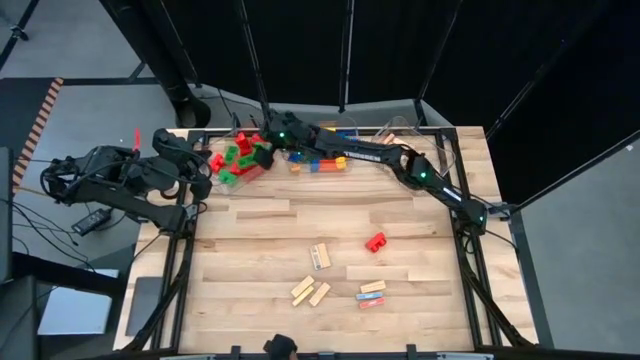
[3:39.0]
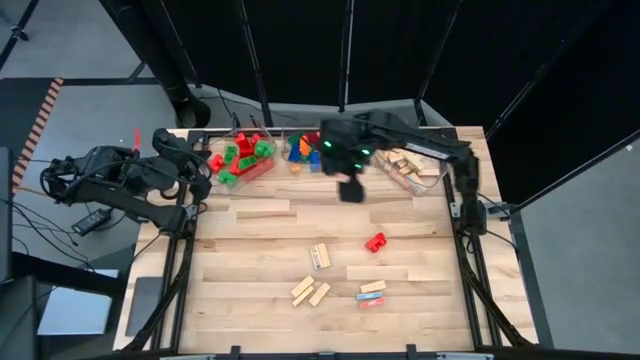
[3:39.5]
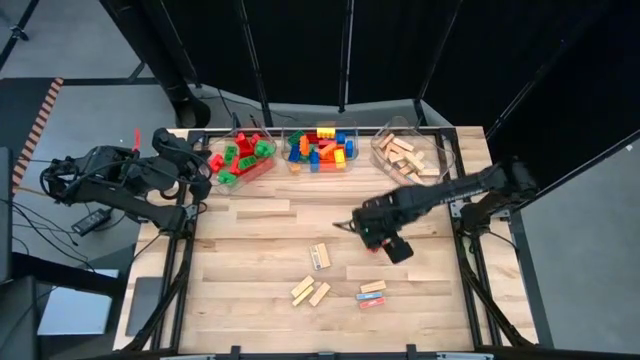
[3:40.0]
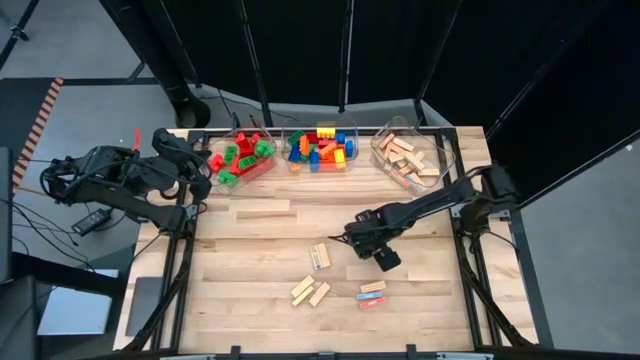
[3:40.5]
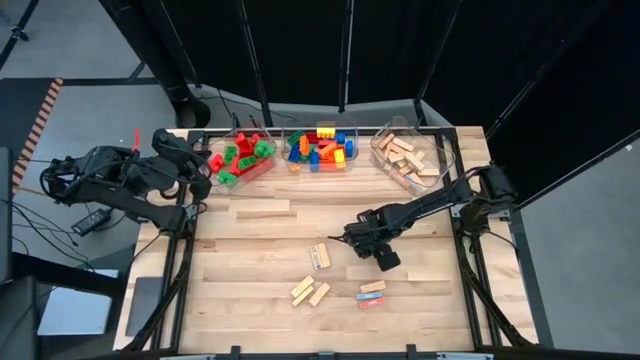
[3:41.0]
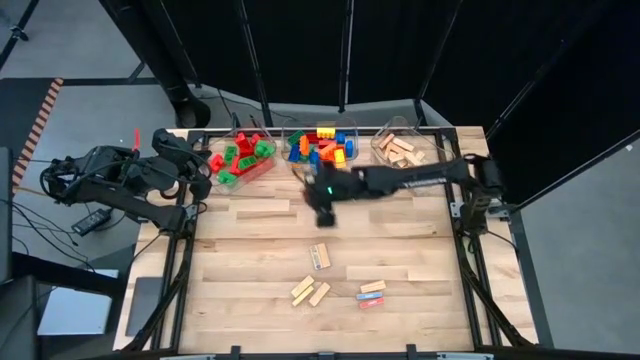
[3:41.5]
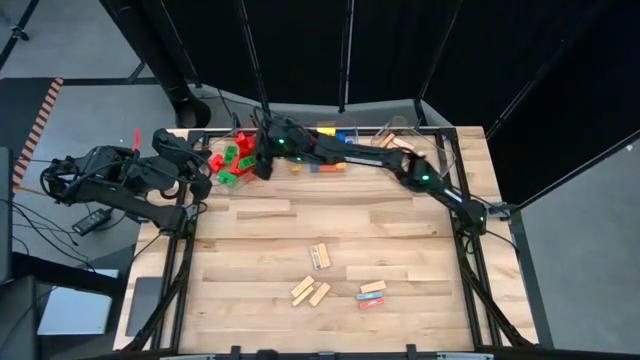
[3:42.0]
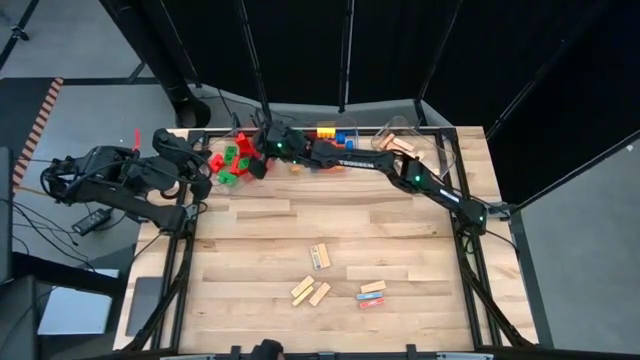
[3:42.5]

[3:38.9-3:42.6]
Task: Sort blocks by size
Put the small red game piece into the left transparent bin

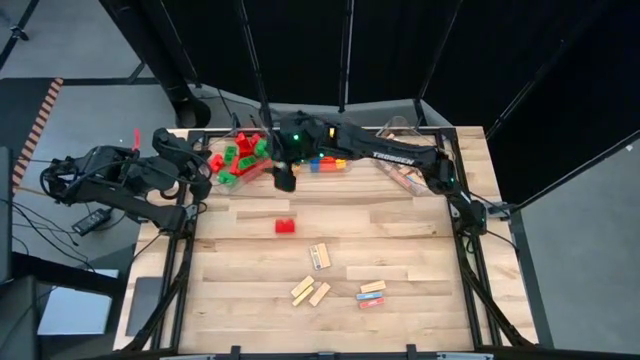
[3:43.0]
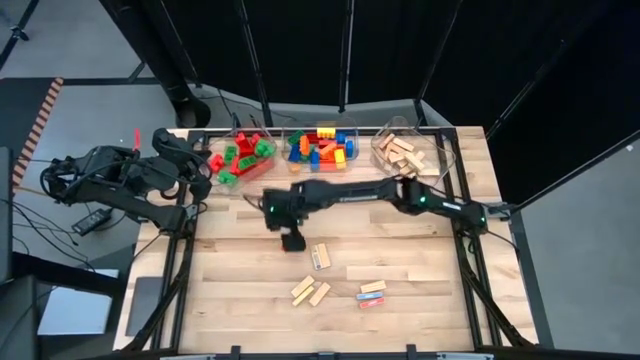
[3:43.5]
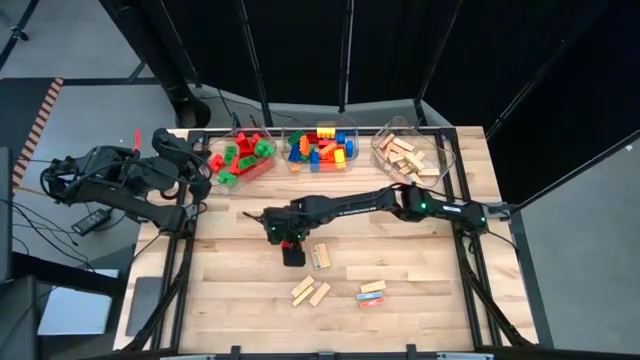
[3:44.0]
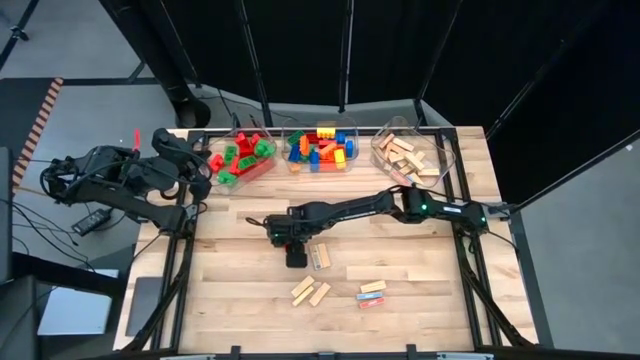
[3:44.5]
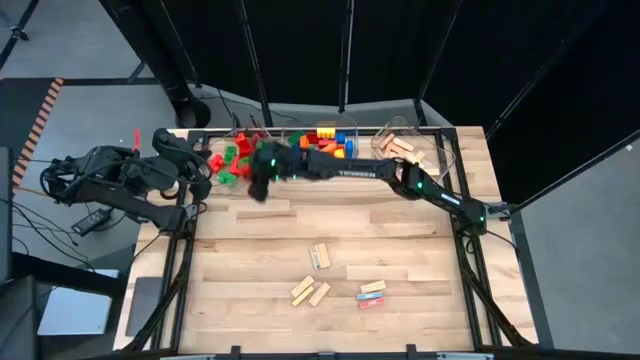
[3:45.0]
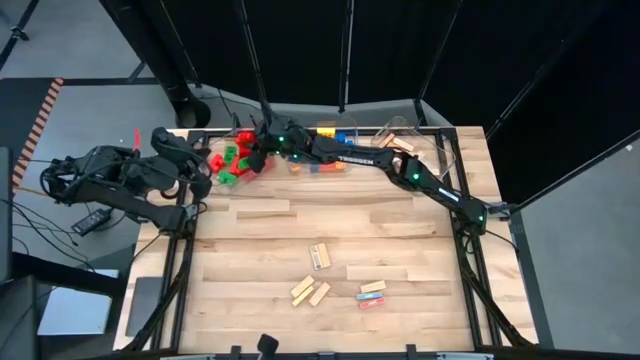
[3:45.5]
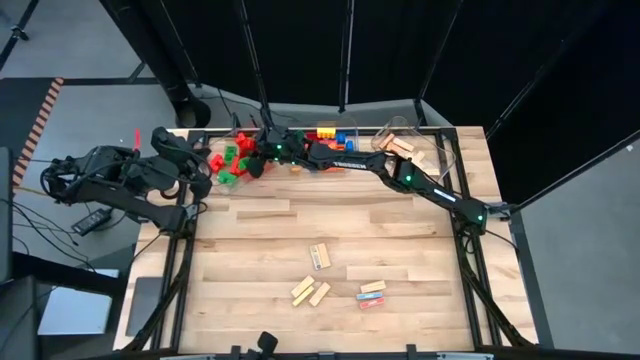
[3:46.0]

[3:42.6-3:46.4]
Put the small red game piece into the left transparent bin

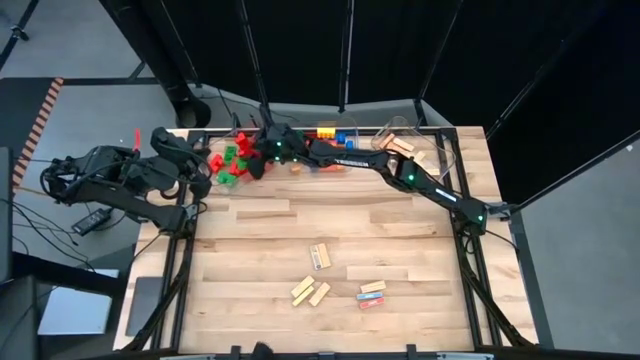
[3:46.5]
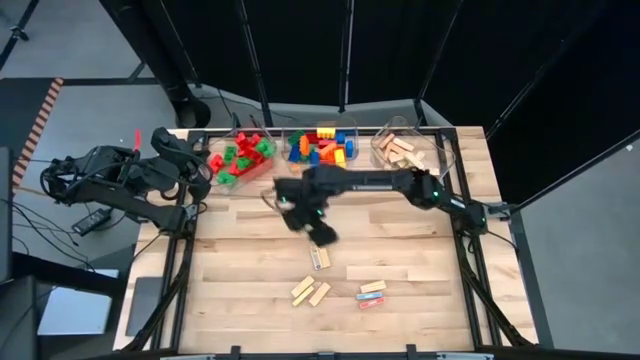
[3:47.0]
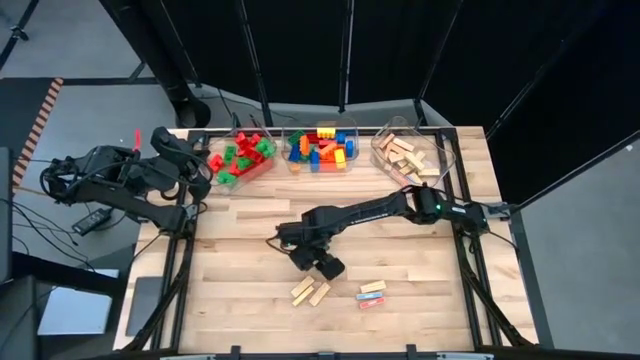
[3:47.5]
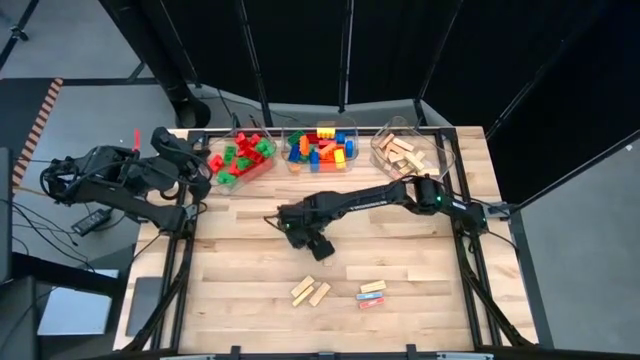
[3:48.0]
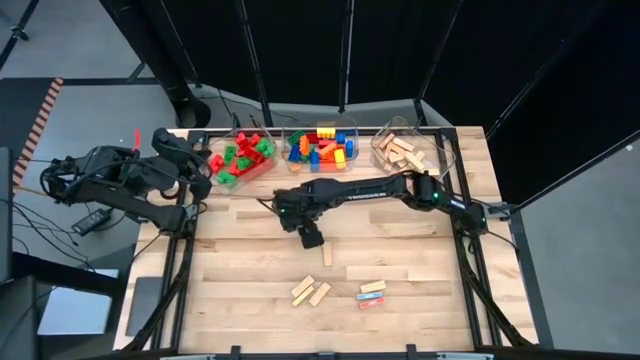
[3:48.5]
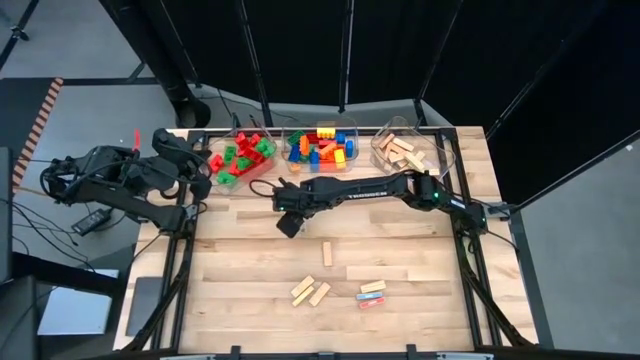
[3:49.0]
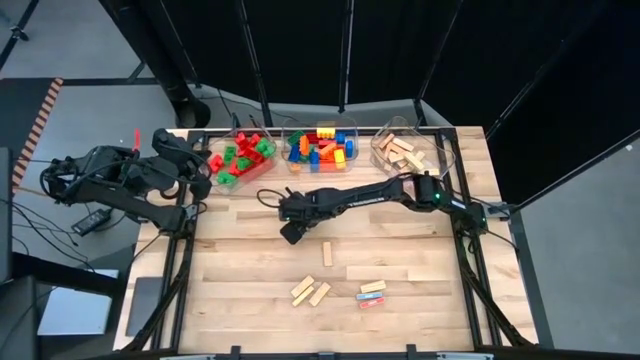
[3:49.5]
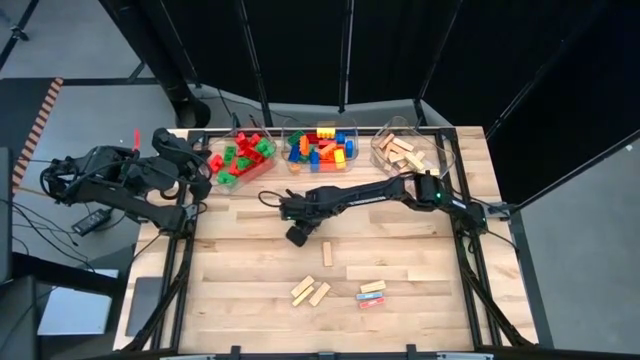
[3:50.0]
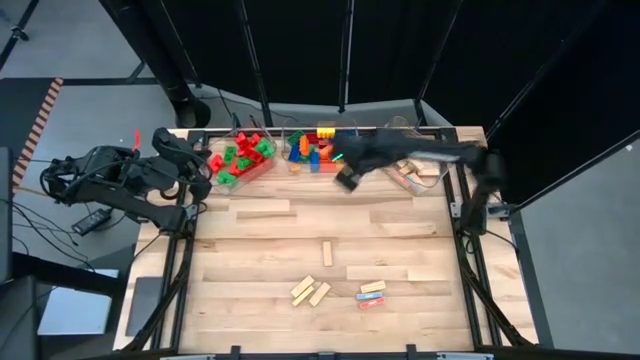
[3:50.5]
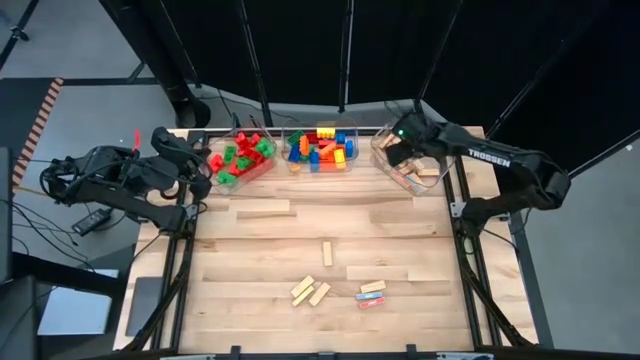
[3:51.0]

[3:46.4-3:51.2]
Put the brown wooden block into the right transparent bin

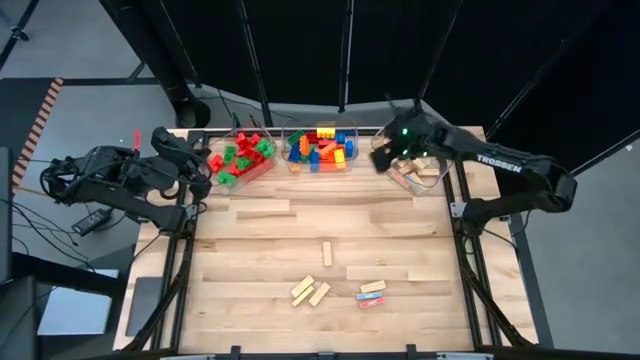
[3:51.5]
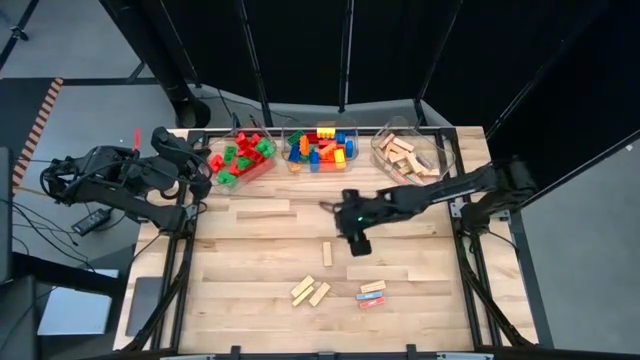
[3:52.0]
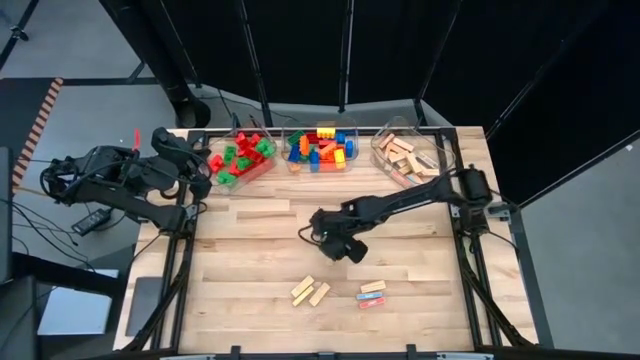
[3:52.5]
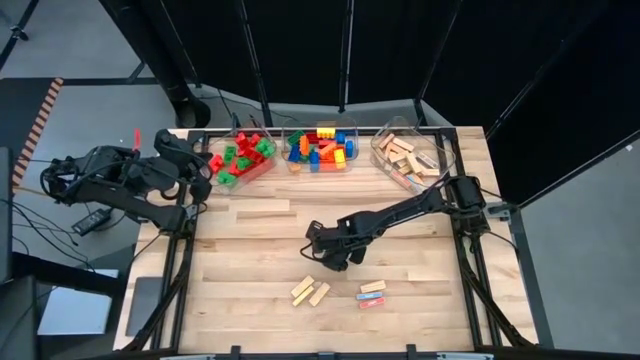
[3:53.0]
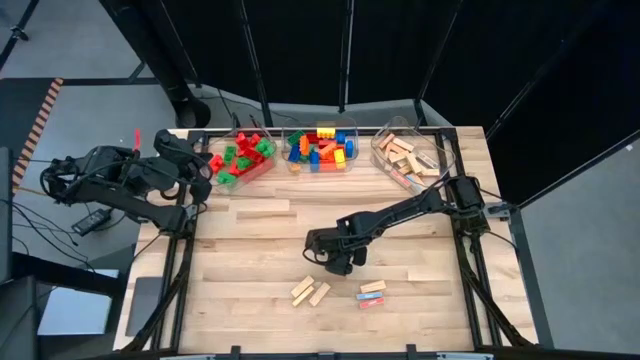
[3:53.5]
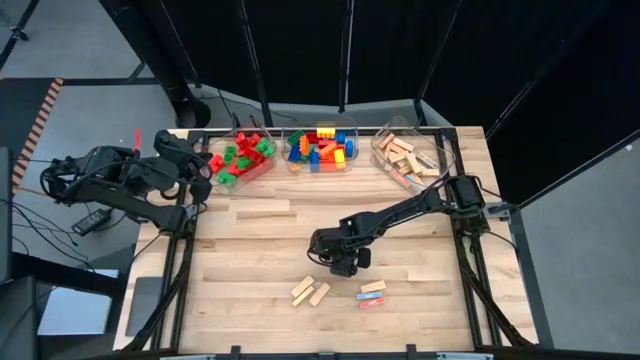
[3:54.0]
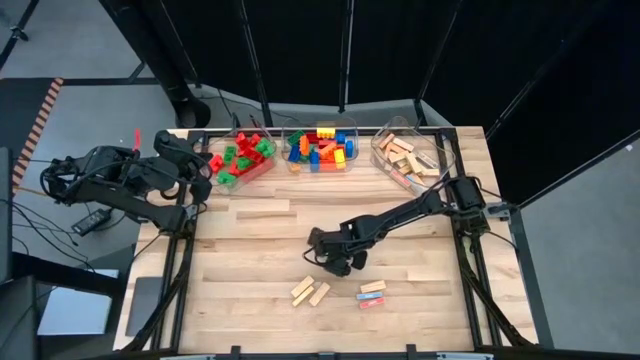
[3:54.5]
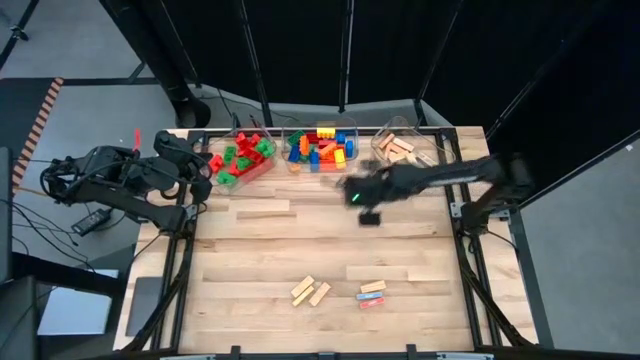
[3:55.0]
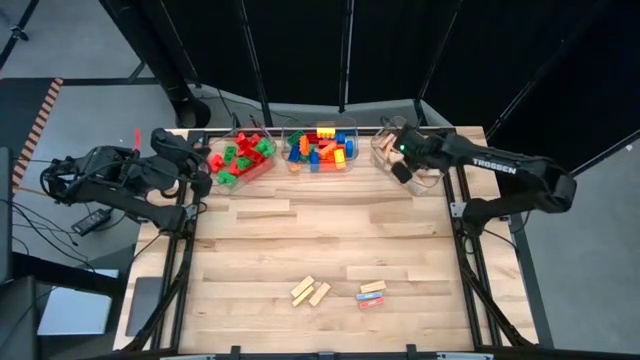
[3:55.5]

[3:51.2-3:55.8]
Put the brown wooden block into the right transparent bin

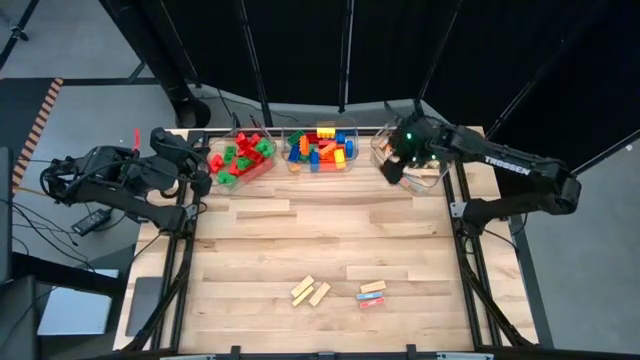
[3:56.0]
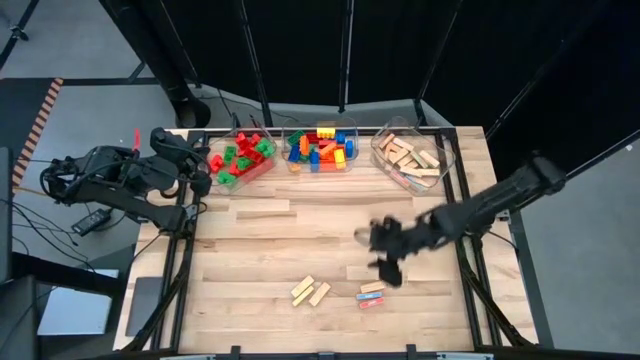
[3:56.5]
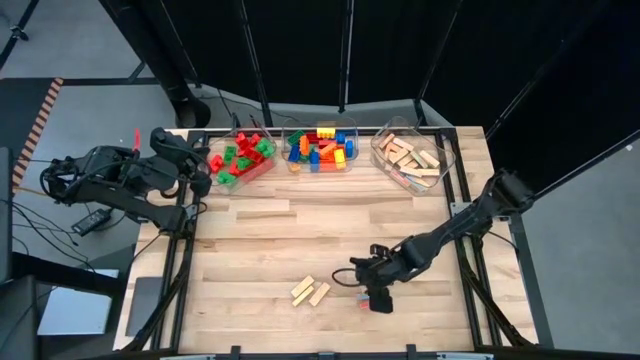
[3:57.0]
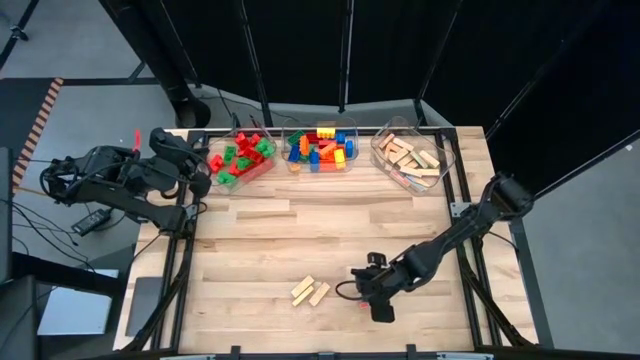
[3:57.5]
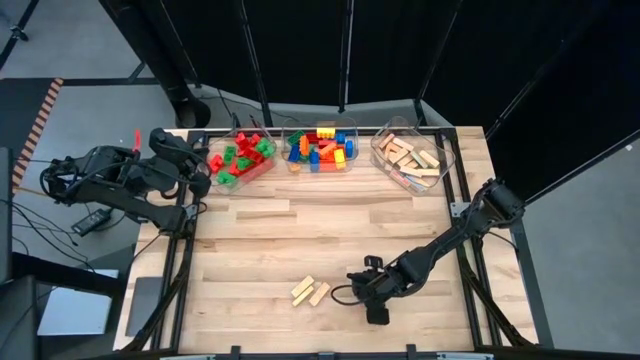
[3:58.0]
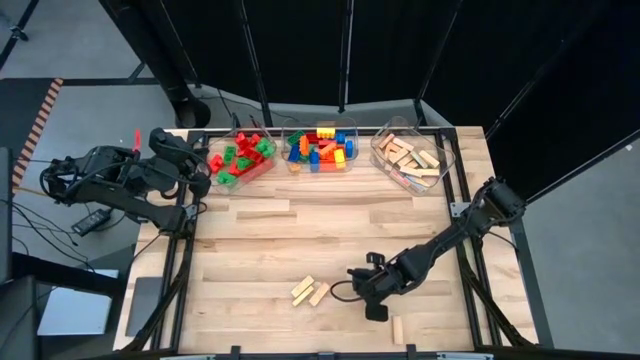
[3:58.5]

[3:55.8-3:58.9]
Put the brown wooden block into the right transparent bin
